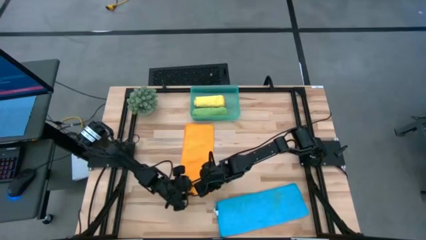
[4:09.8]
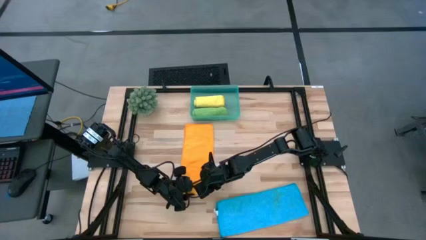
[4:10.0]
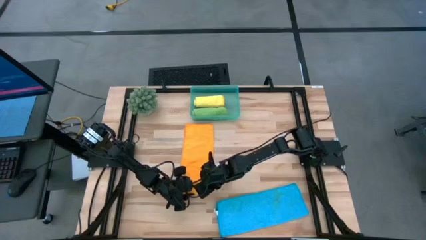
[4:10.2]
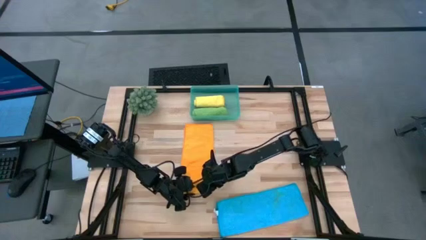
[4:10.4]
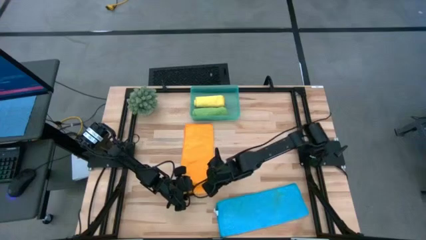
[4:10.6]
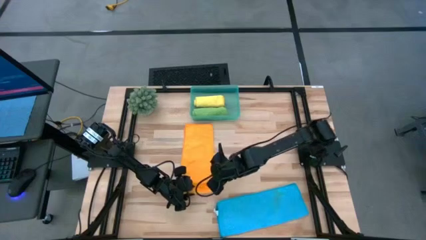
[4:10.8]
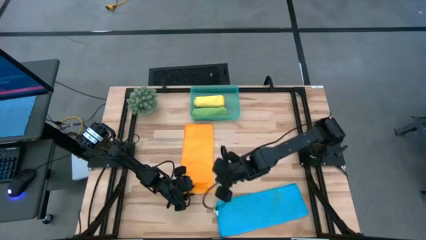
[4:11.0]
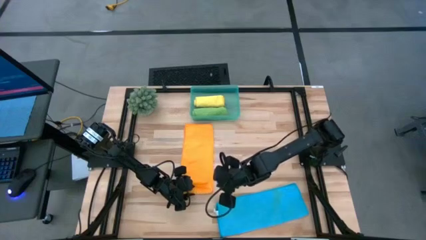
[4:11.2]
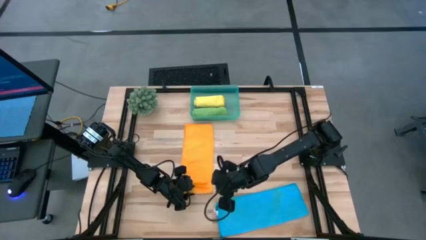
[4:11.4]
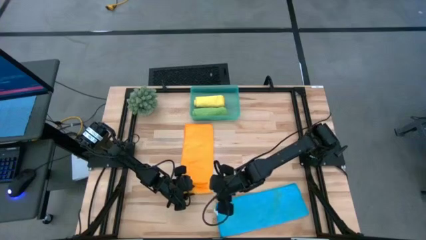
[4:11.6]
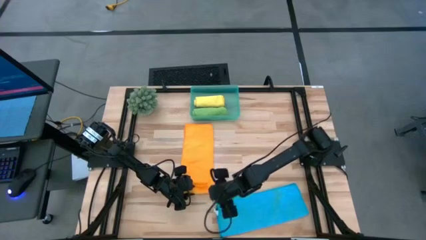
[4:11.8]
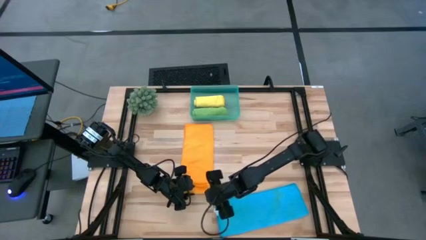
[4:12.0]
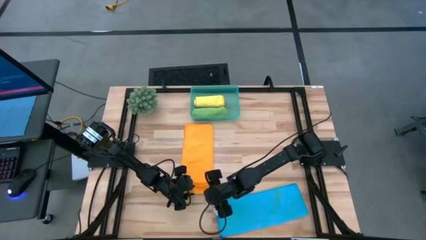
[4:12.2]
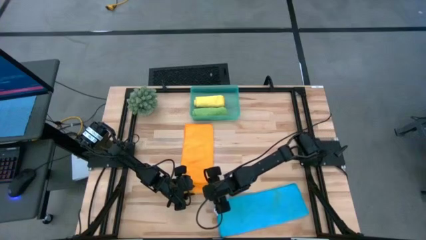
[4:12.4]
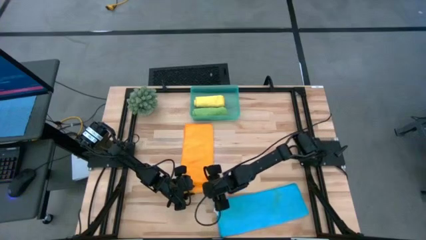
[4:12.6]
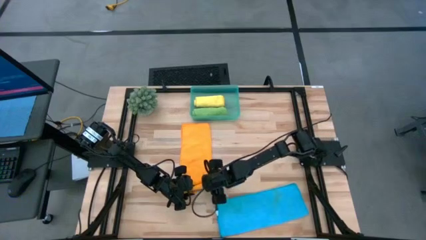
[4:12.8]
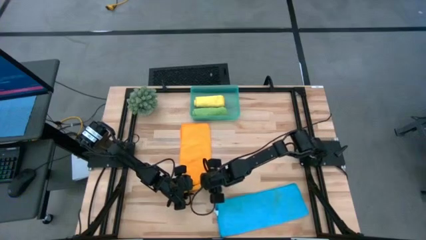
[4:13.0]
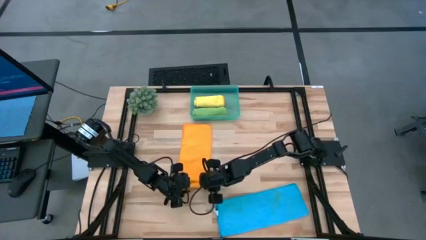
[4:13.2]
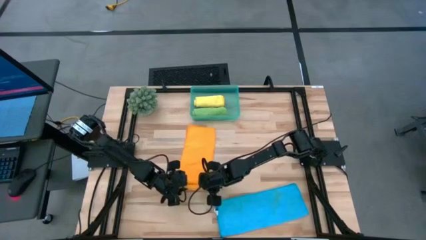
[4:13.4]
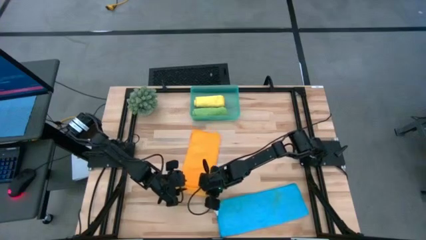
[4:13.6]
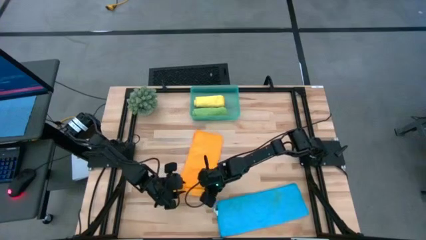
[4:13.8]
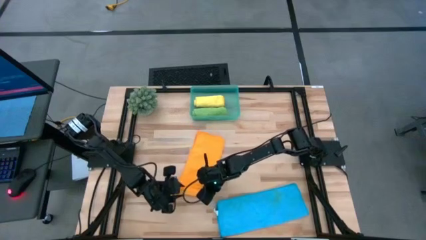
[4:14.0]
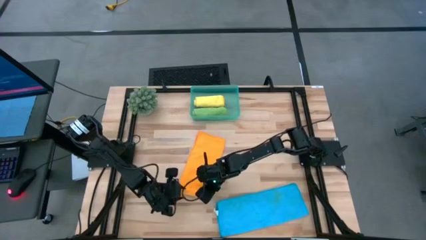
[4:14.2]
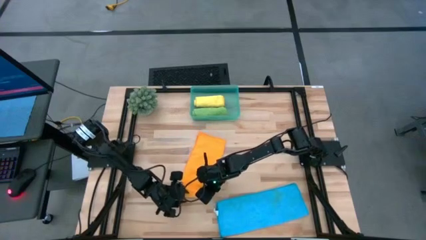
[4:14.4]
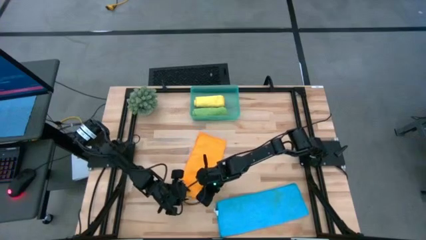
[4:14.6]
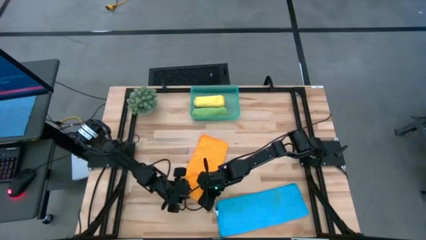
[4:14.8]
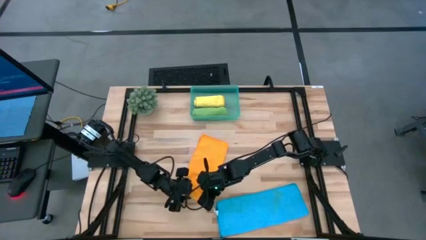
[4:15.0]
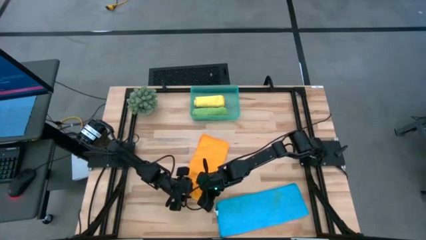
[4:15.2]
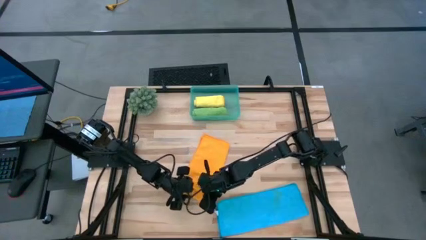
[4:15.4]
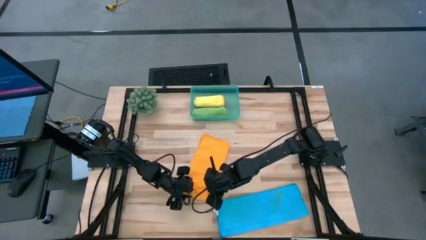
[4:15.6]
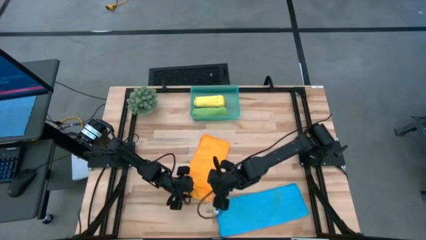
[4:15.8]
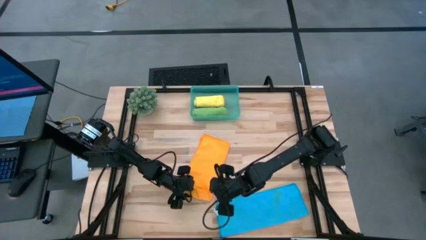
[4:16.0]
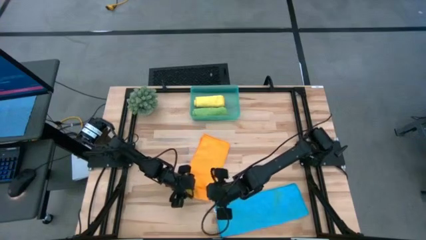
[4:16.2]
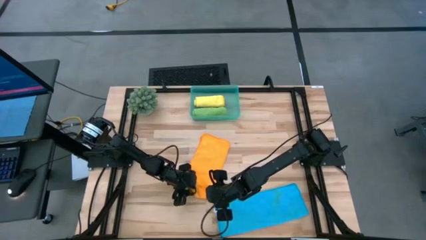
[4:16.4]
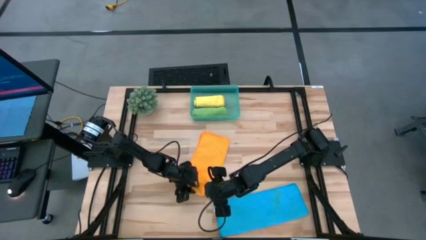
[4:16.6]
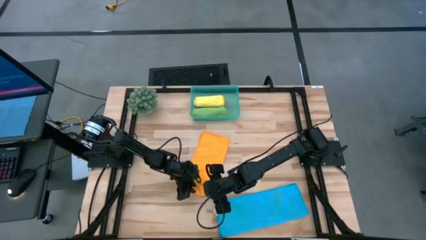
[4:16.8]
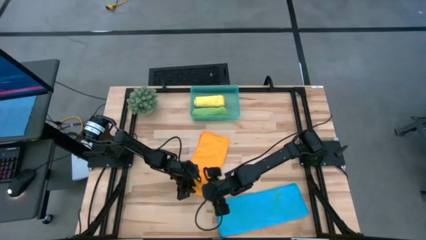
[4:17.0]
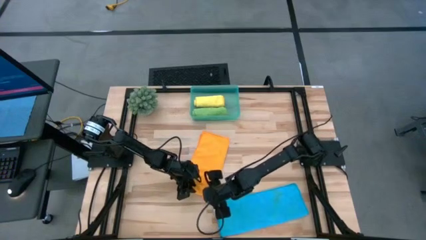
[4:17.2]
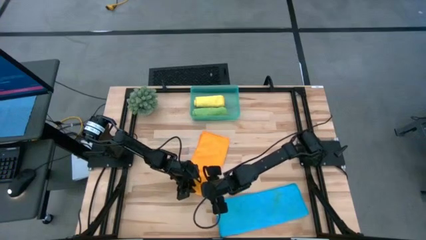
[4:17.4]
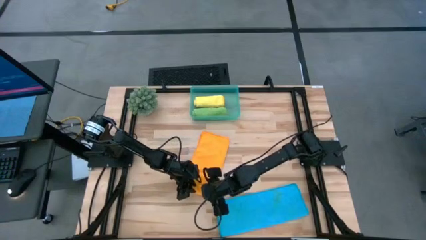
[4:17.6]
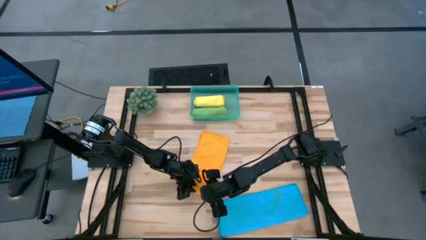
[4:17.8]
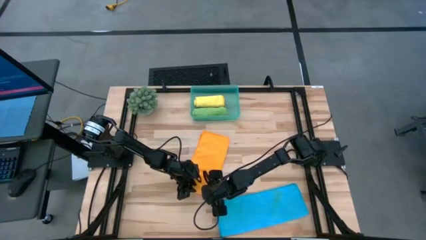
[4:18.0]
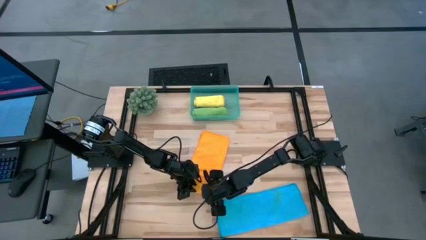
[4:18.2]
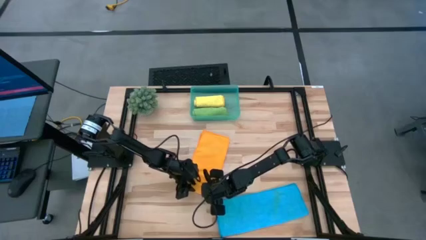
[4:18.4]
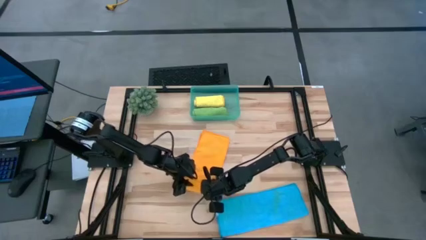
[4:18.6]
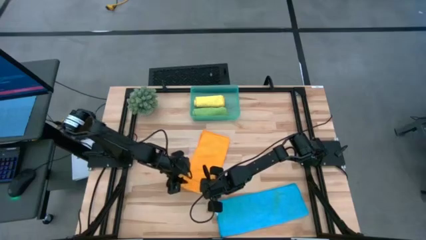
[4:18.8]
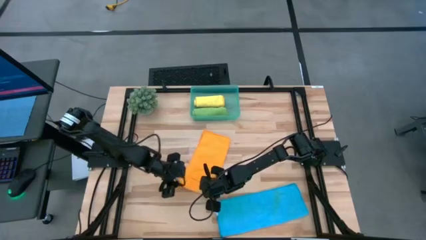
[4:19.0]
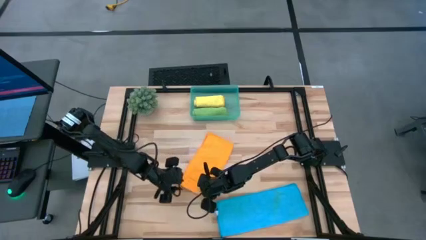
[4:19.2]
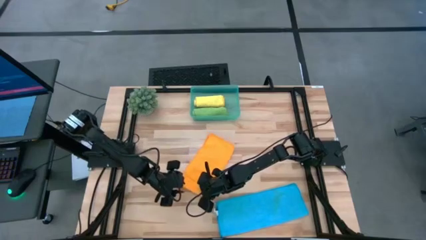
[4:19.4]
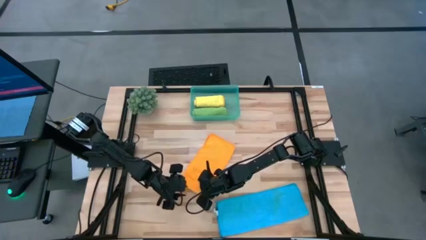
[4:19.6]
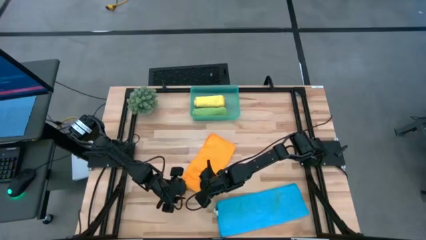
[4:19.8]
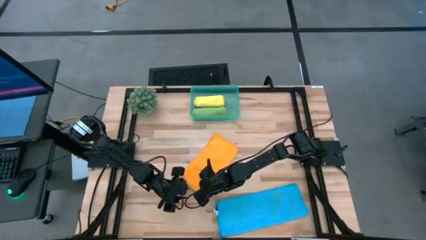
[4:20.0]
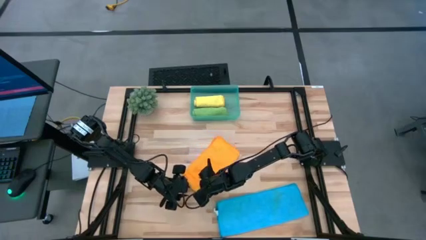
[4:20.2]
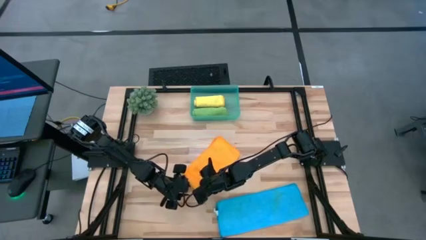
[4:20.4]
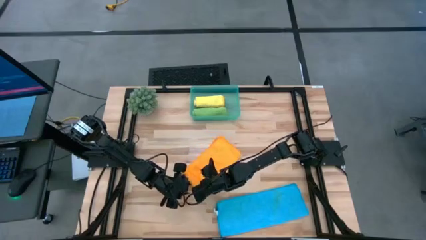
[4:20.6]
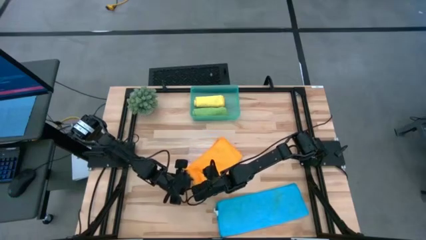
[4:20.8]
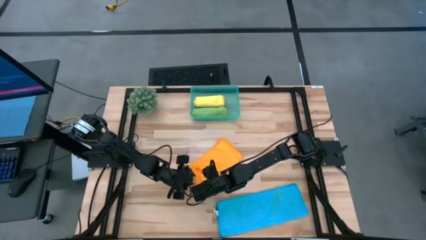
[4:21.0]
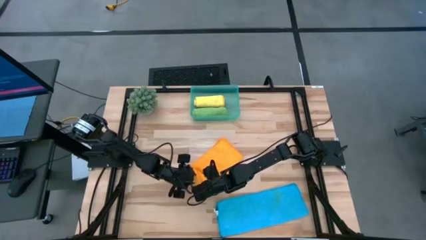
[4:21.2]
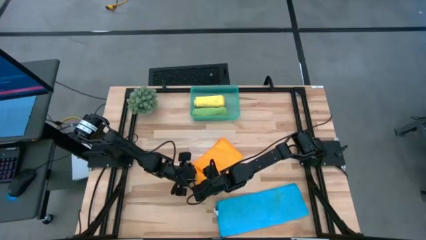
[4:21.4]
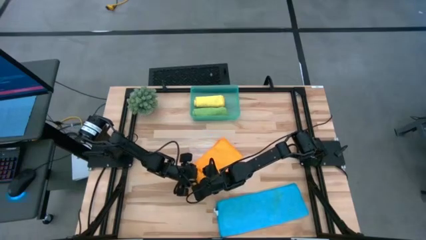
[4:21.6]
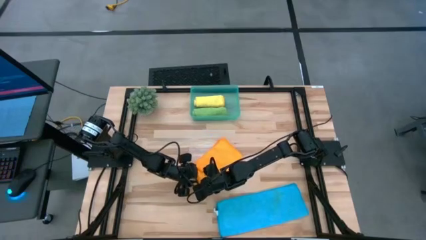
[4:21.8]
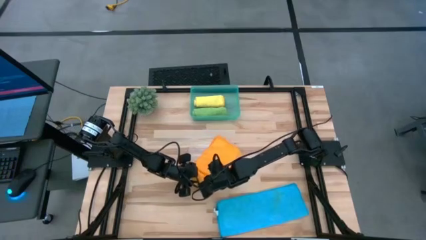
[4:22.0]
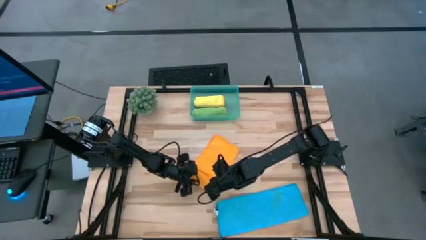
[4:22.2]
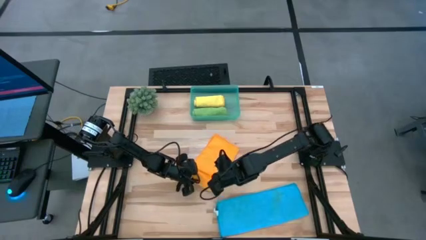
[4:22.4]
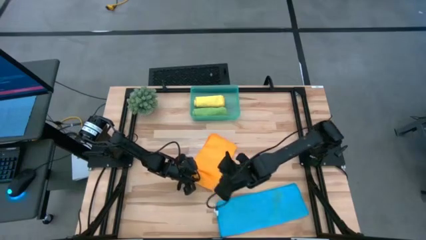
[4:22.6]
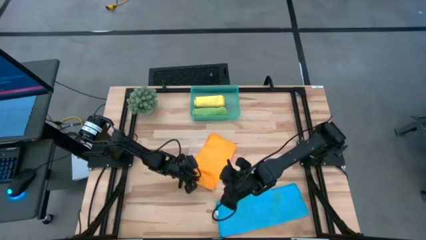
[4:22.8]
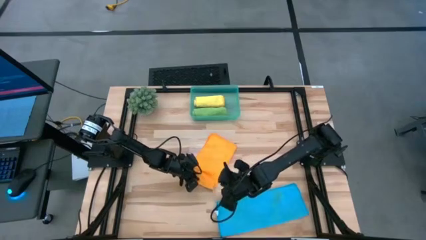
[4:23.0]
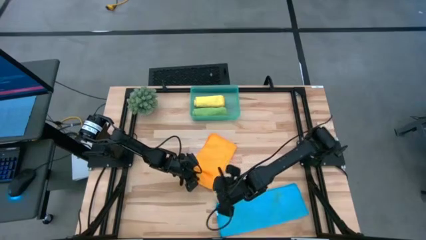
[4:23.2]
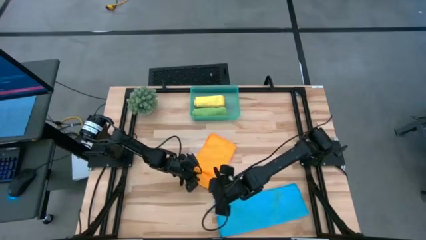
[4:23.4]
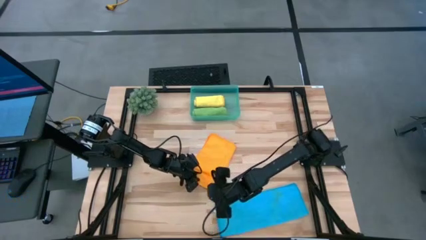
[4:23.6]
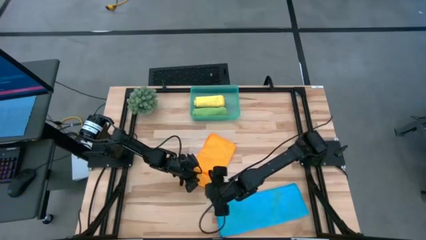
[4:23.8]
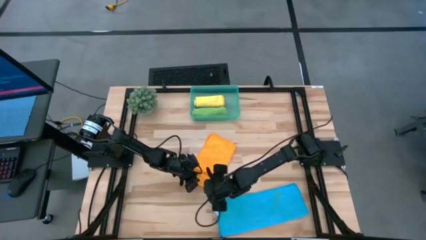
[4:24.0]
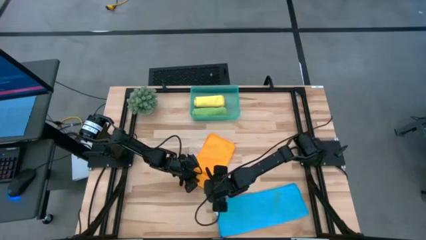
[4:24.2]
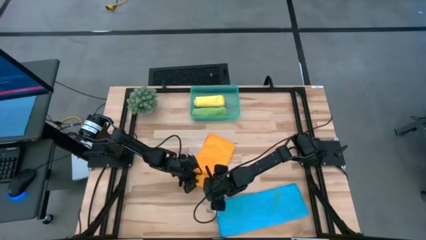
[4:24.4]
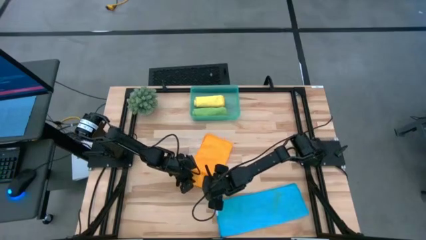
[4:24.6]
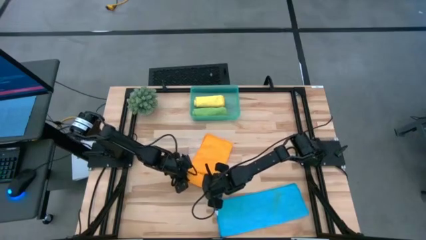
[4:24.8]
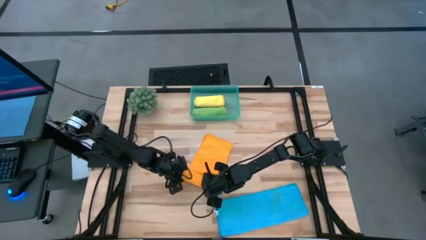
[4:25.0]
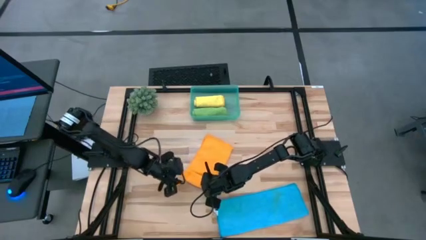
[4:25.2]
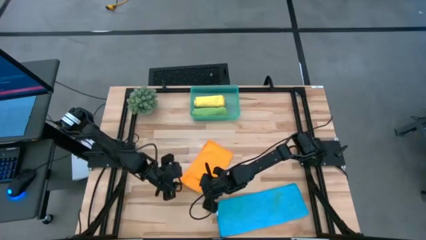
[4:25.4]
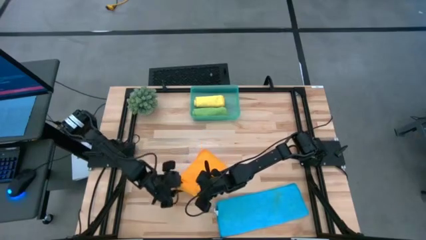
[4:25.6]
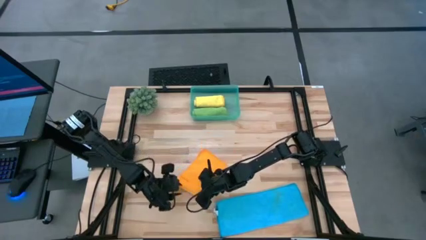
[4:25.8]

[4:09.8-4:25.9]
Task: Roll microfiber towels into tight, uniform cylinder then place into a basket
Roll the orange towel
